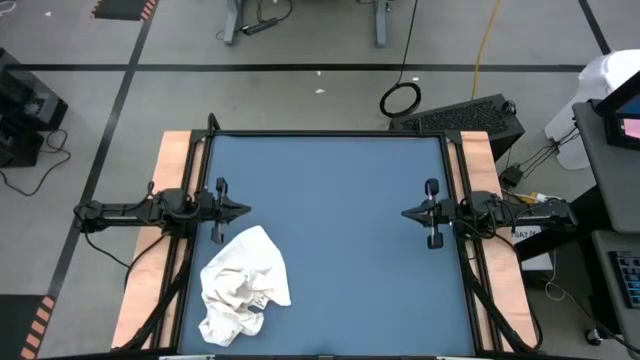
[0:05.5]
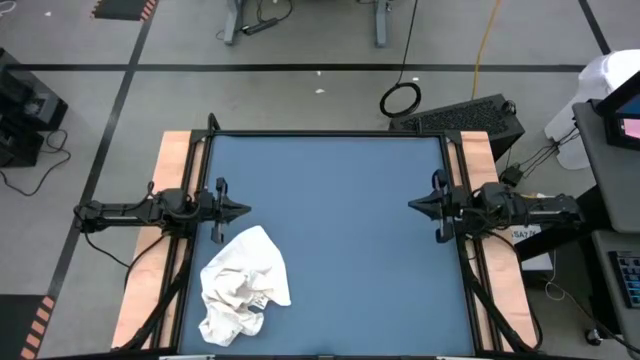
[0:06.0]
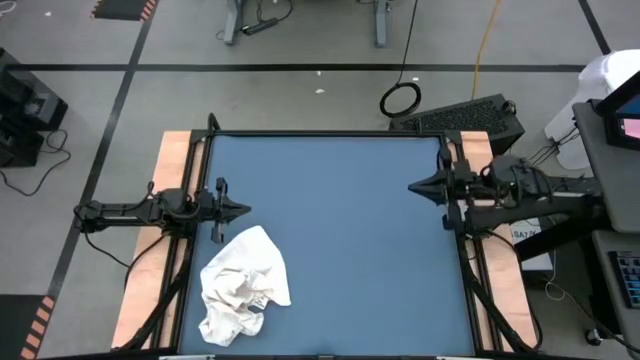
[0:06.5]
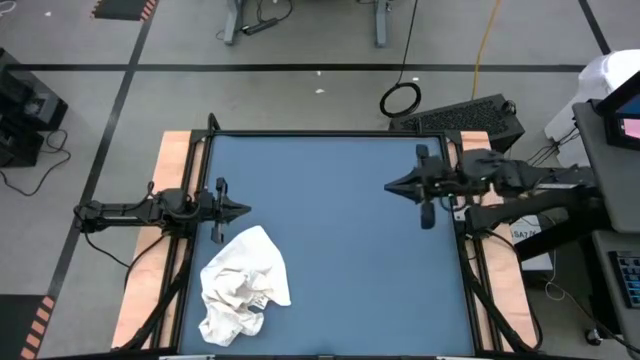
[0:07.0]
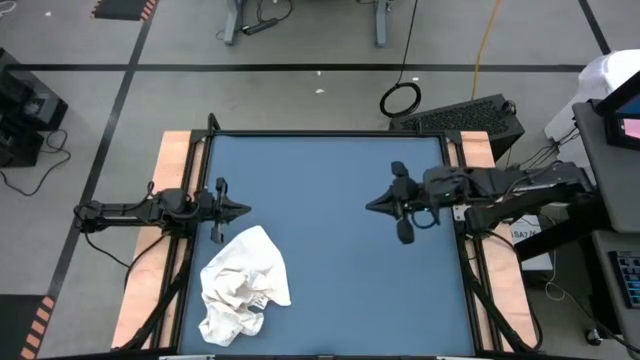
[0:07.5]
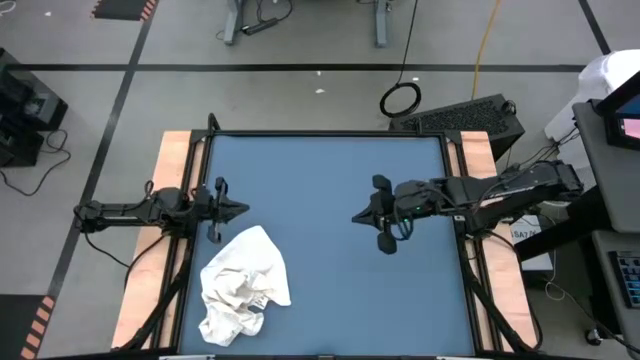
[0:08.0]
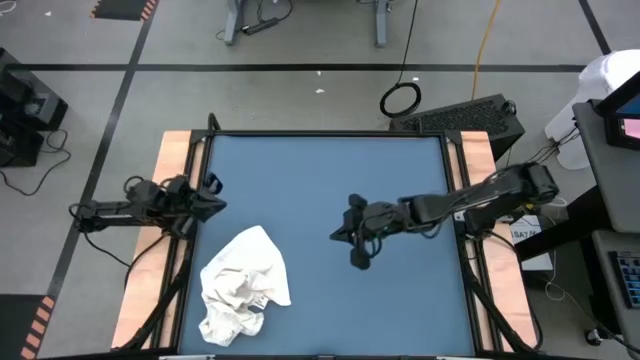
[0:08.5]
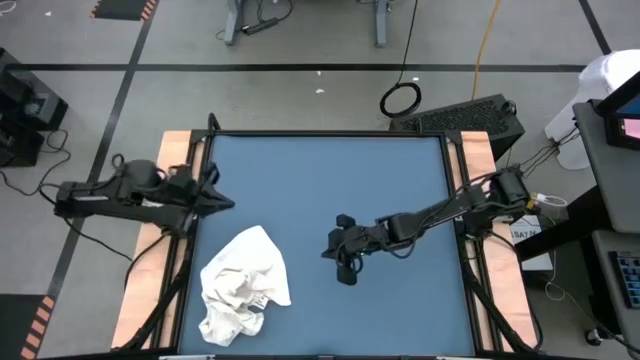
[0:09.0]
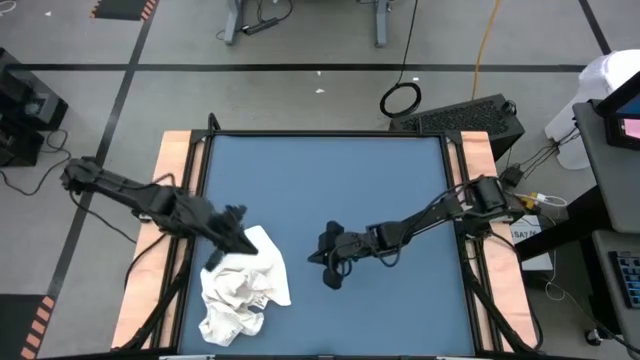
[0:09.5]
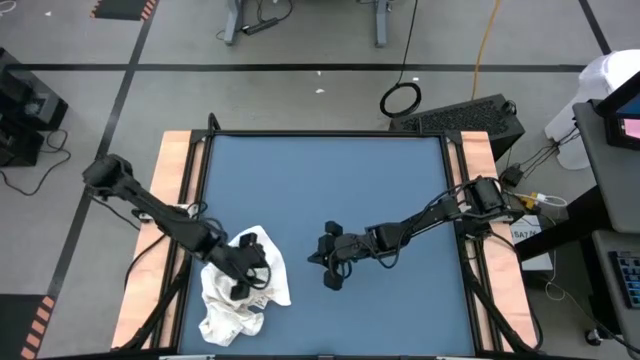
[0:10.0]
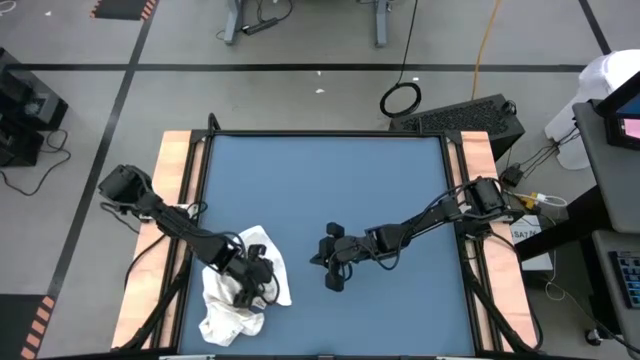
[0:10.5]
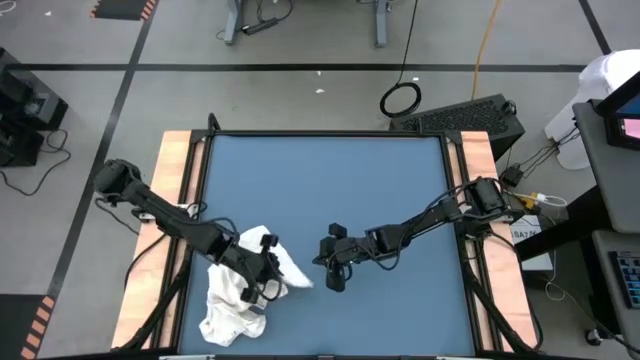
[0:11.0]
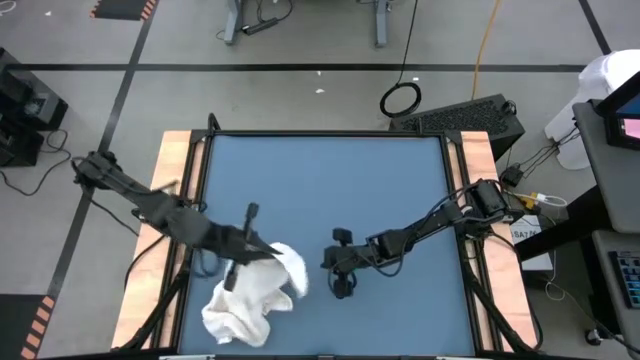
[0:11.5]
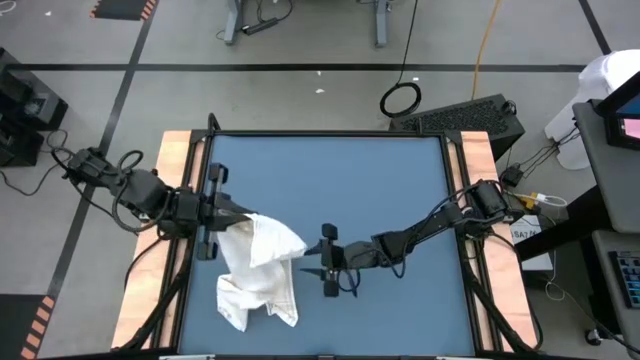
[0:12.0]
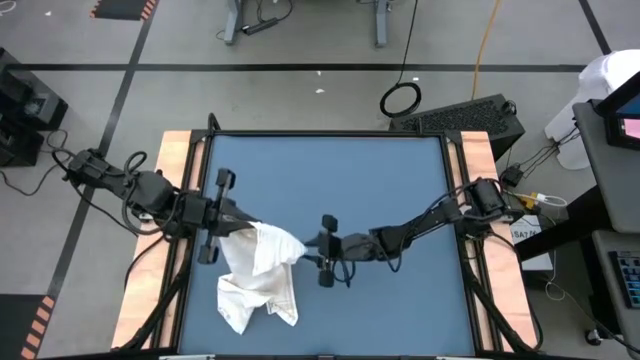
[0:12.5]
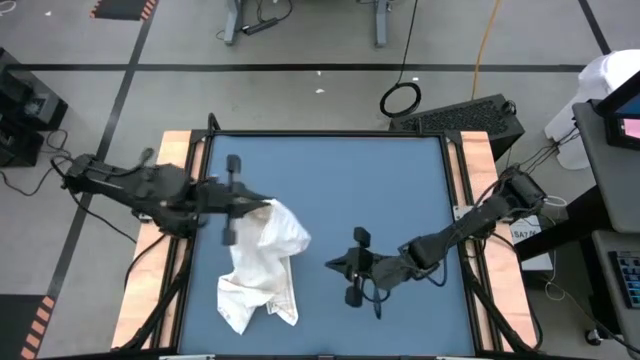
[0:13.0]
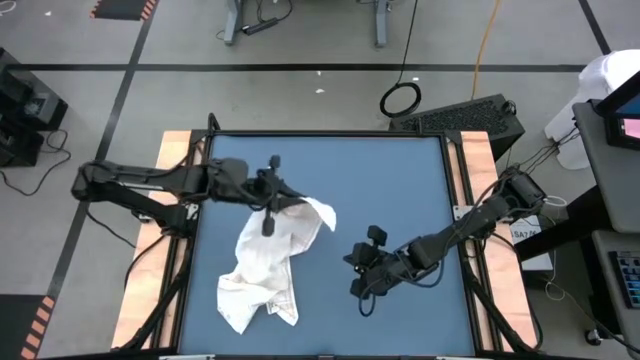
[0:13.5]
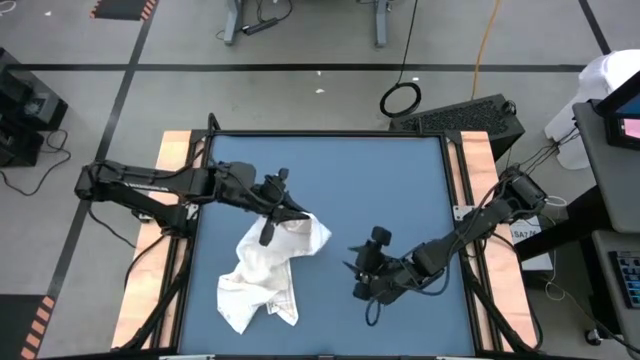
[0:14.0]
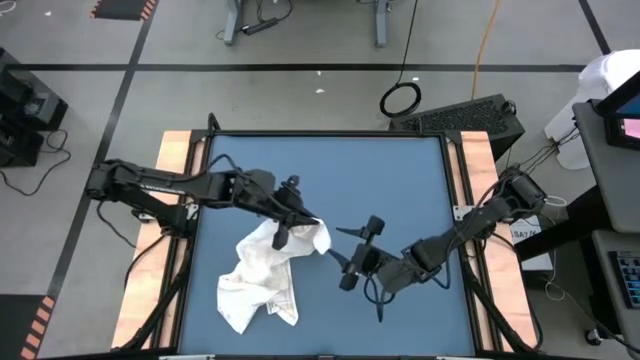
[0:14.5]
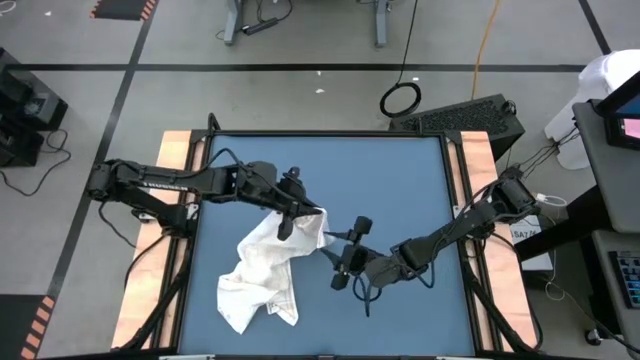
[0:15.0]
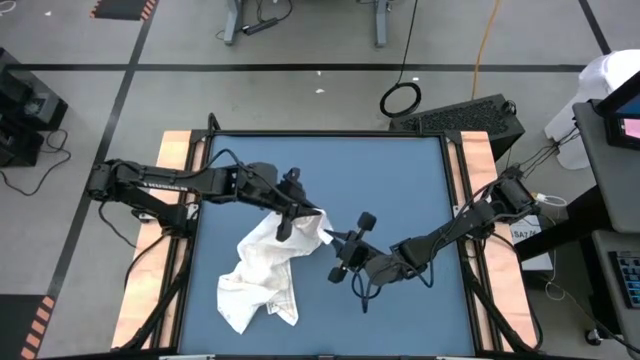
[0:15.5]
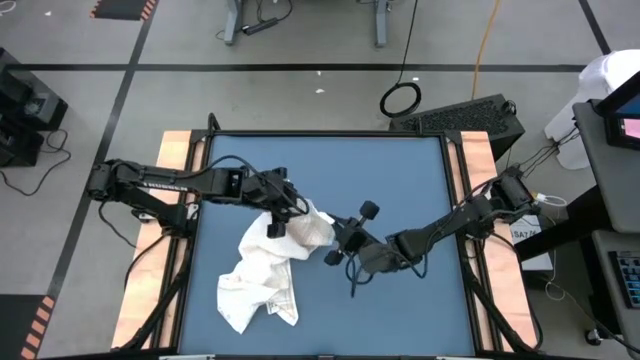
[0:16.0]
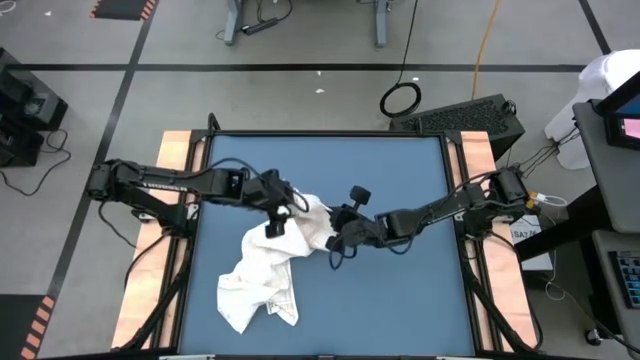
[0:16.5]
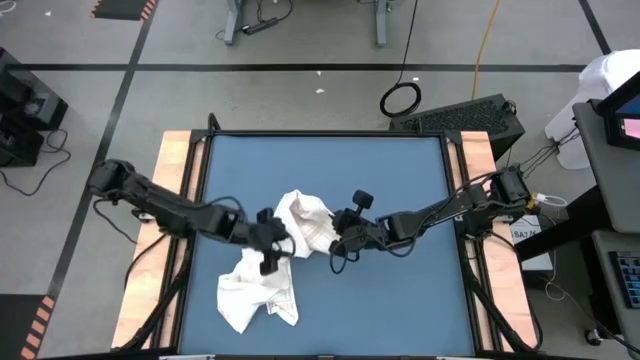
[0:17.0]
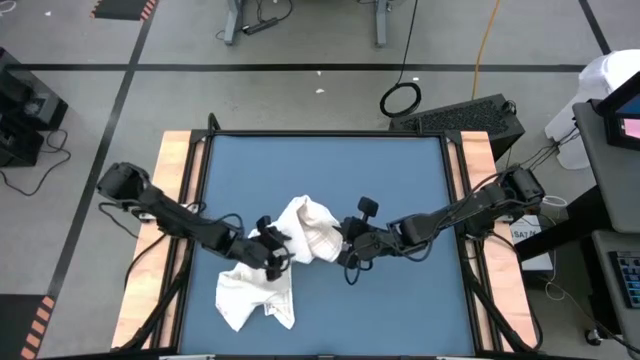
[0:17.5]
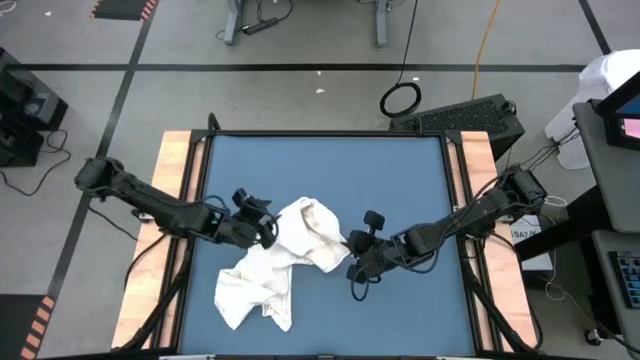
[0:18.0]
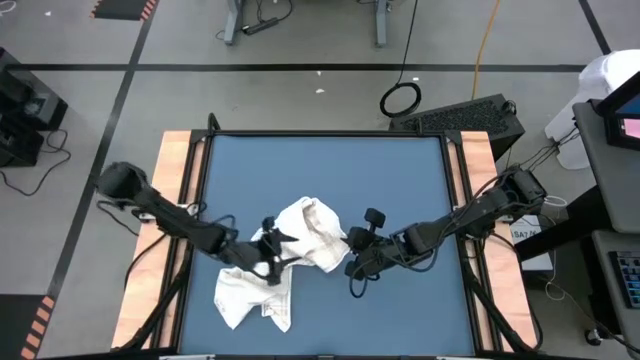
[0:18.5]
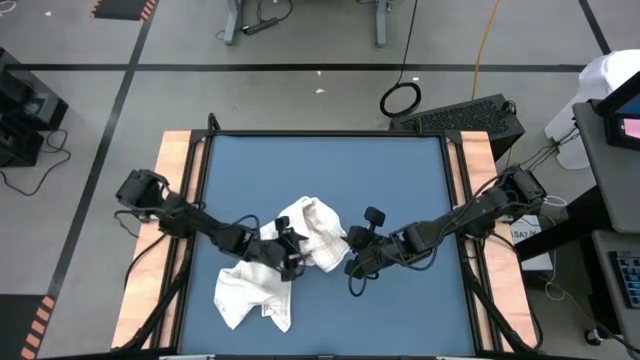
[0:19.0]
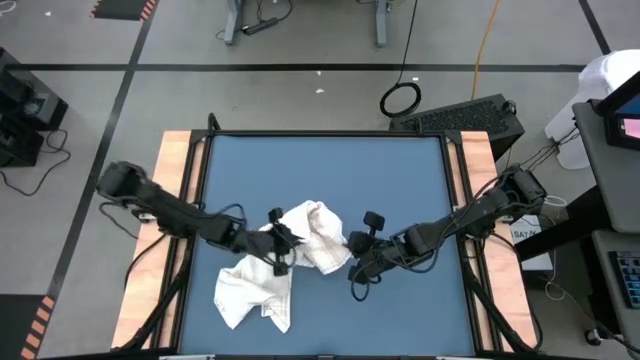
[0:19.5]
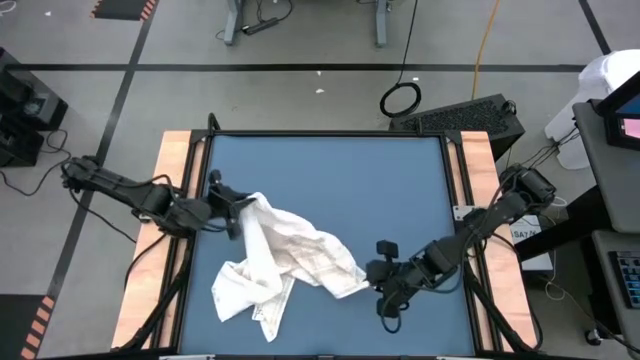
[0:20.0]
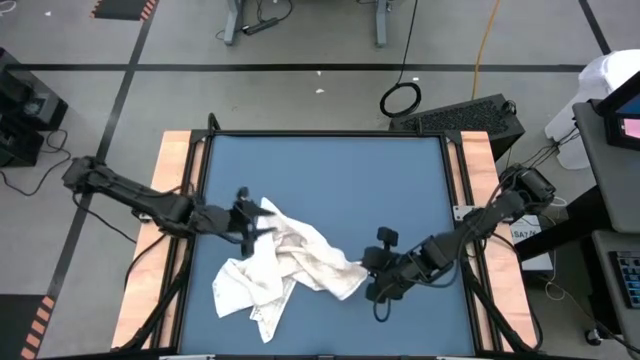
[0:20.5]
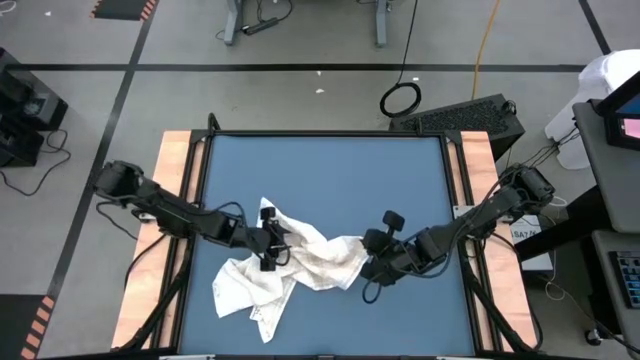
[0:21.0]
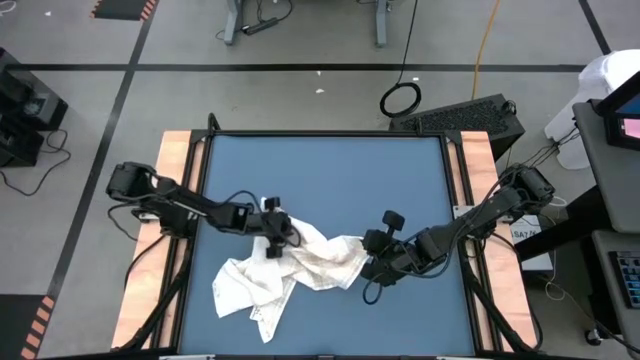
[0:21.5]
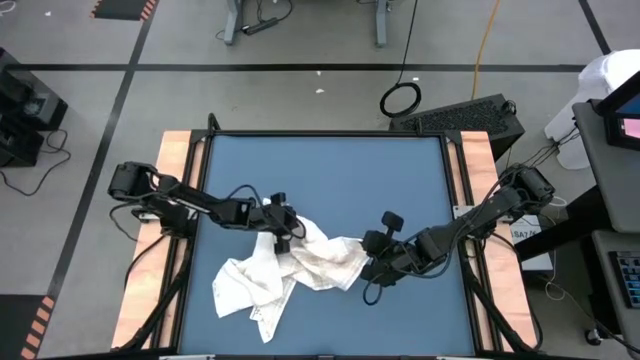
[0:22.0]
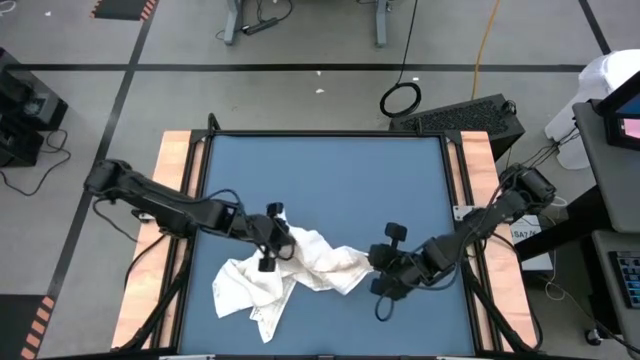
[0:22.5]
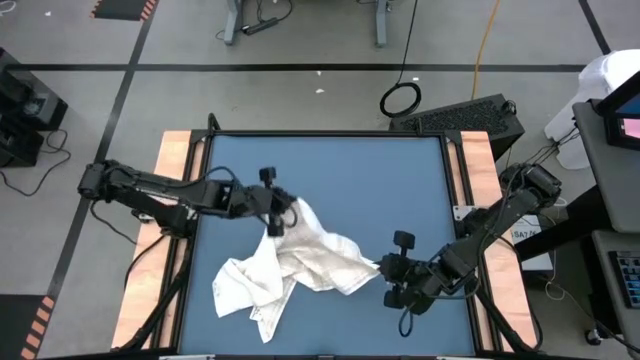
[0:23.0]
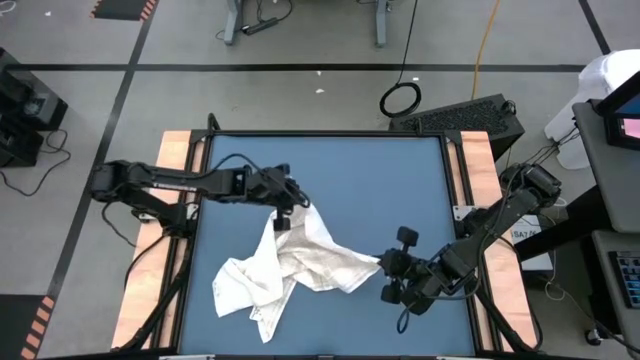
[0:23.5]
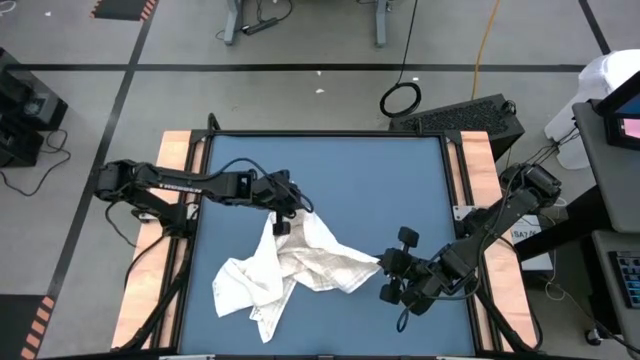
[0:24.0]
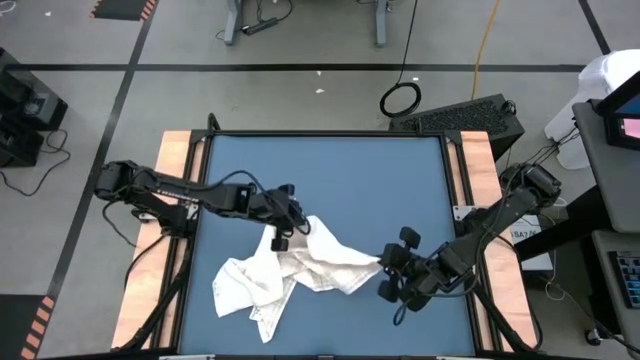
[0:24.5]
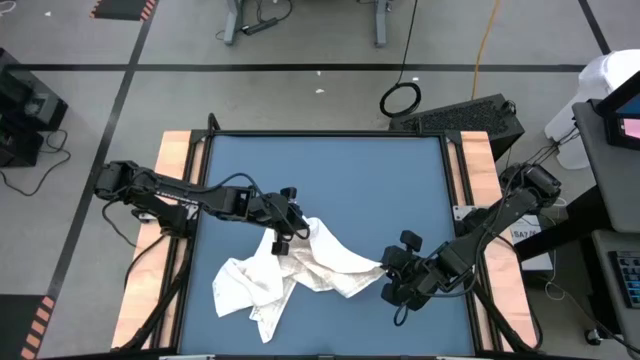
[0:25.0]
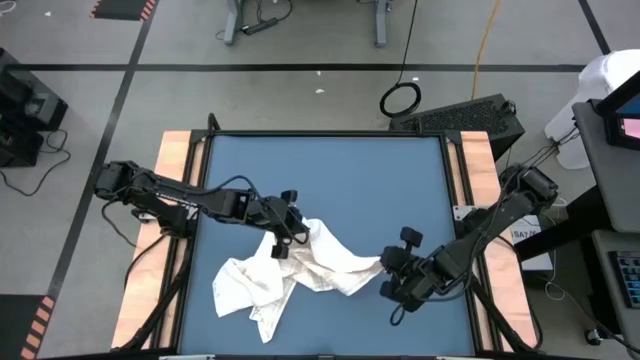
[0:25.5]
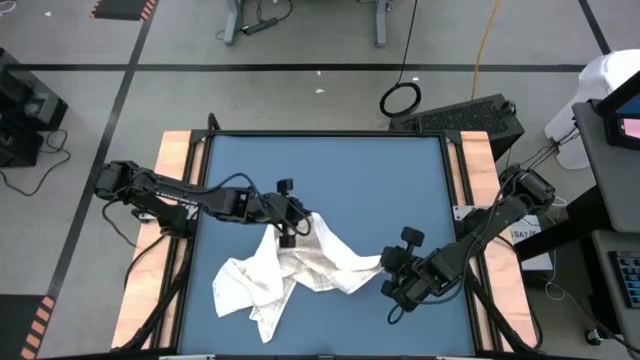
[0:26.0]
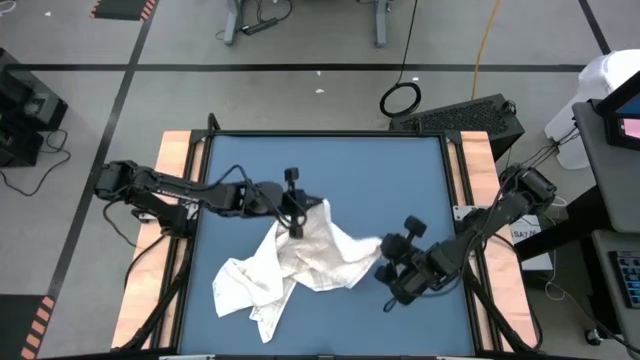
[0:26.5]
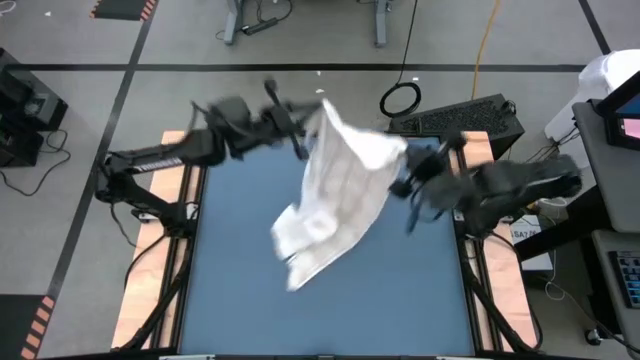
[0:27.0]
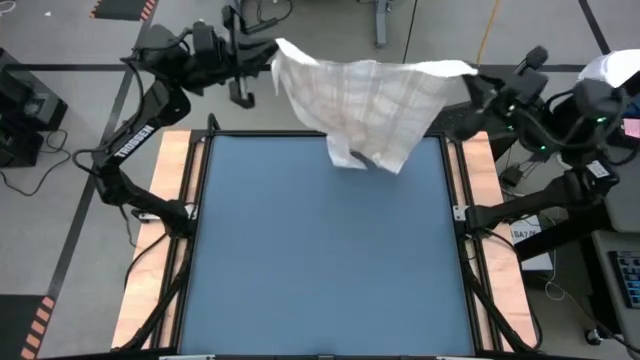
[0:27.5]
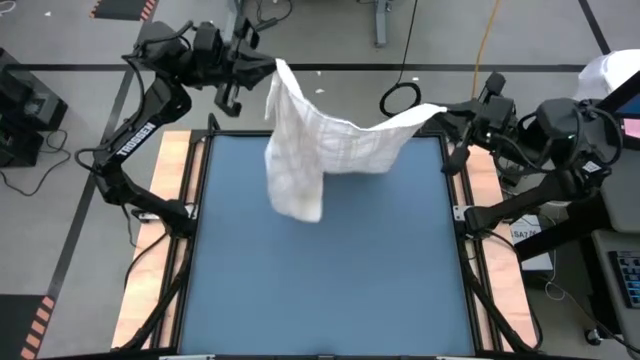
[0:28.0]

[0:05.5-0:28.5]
Task: Roll towel
Fold the white towel
